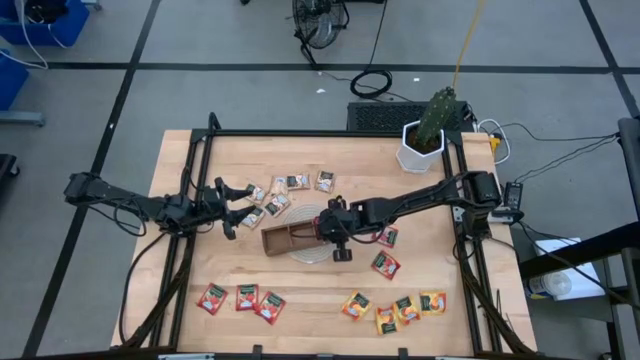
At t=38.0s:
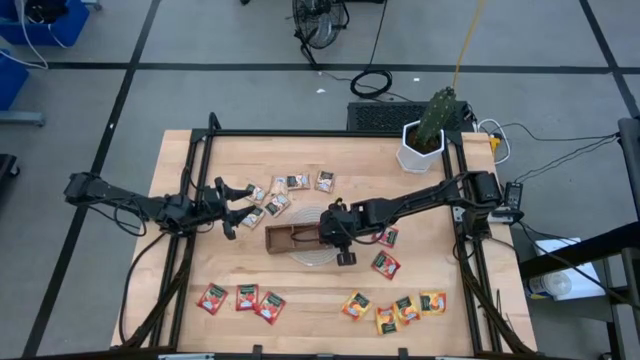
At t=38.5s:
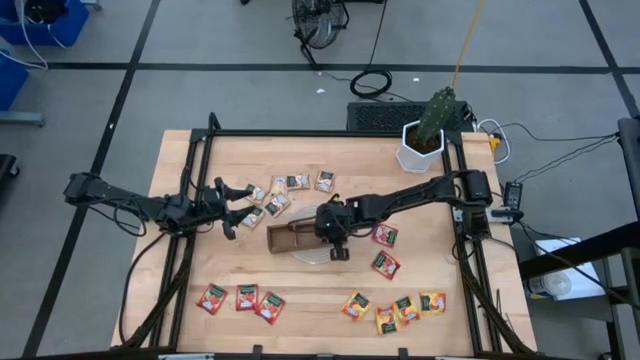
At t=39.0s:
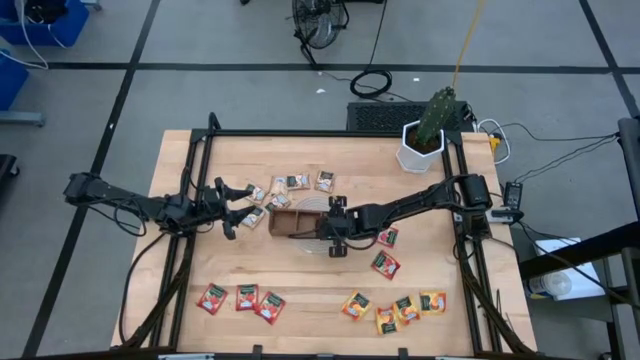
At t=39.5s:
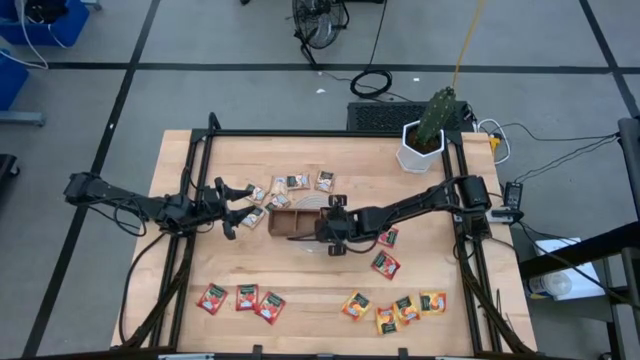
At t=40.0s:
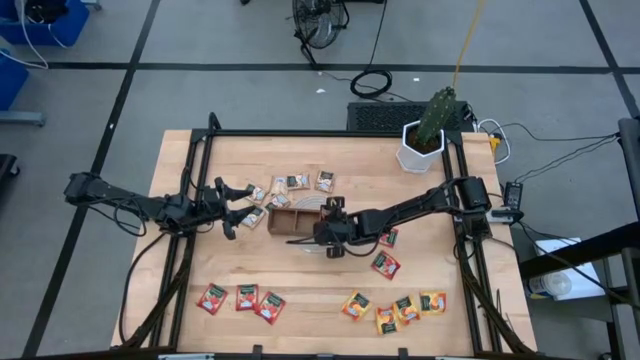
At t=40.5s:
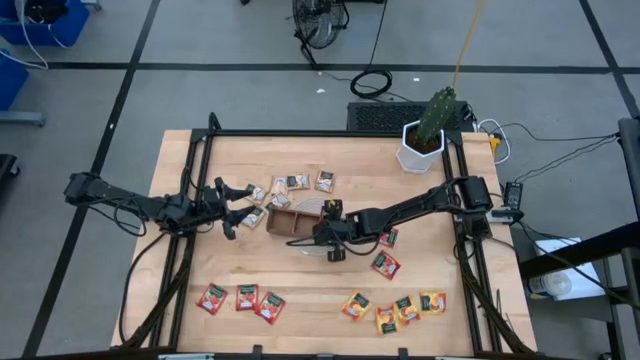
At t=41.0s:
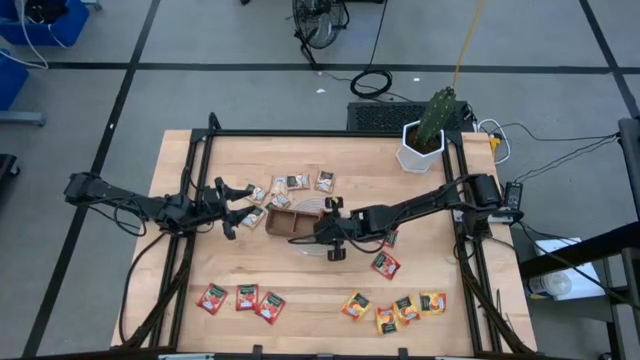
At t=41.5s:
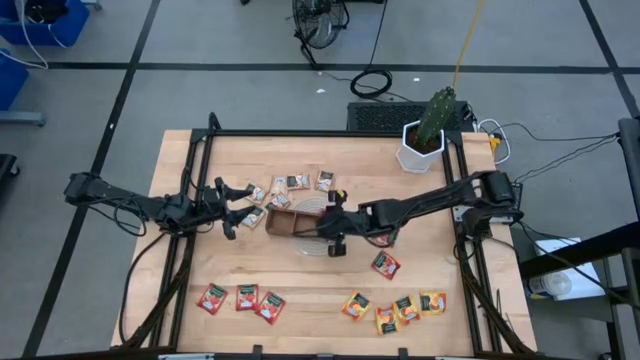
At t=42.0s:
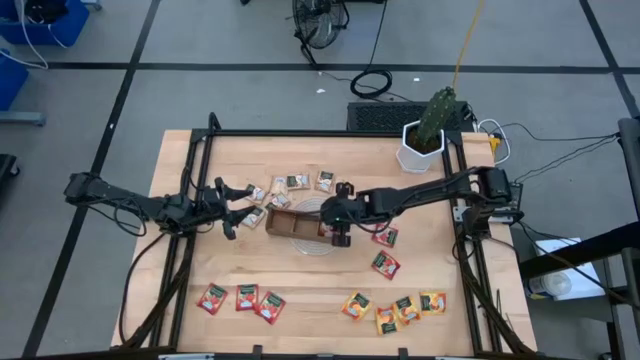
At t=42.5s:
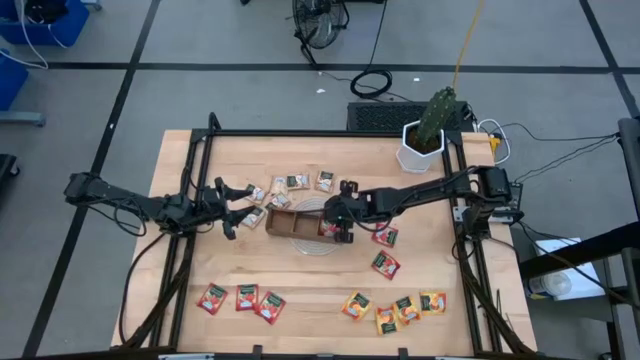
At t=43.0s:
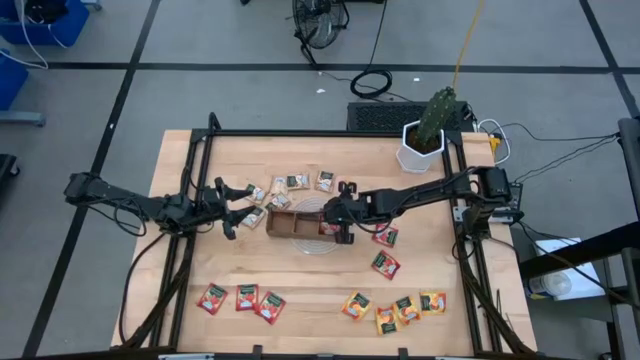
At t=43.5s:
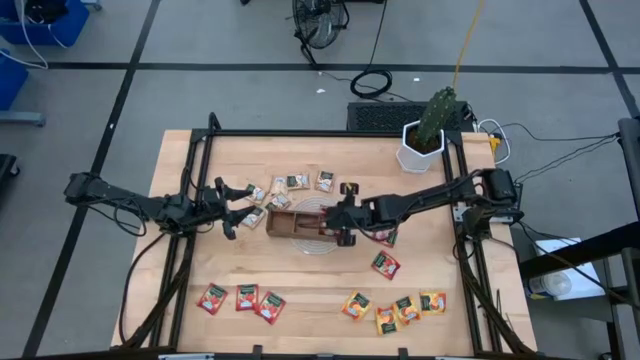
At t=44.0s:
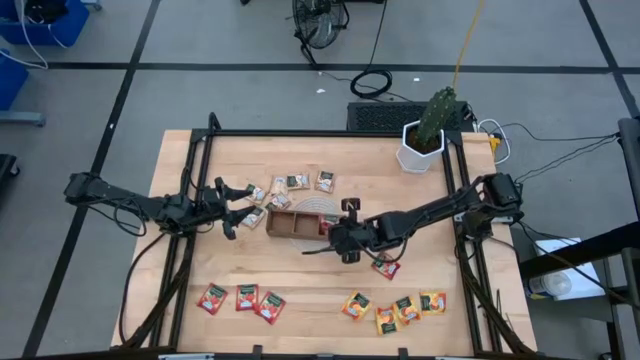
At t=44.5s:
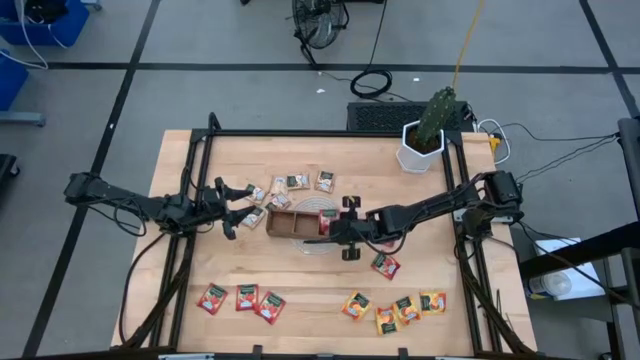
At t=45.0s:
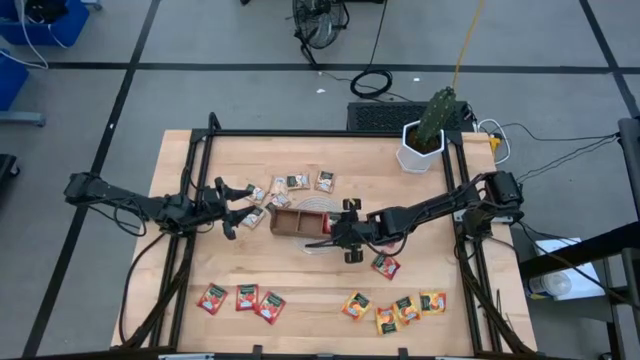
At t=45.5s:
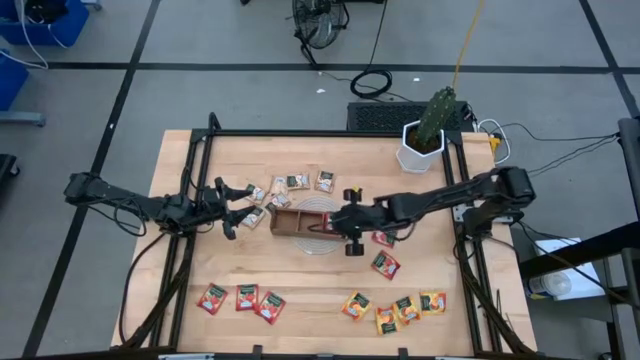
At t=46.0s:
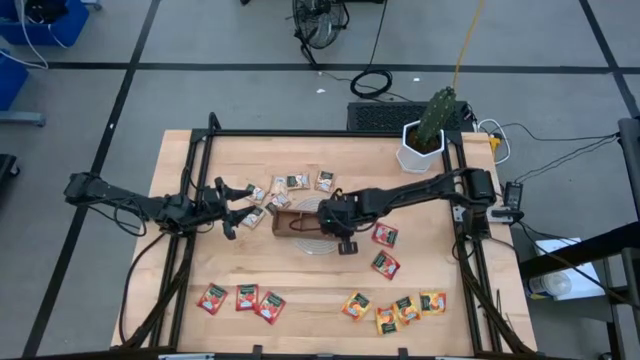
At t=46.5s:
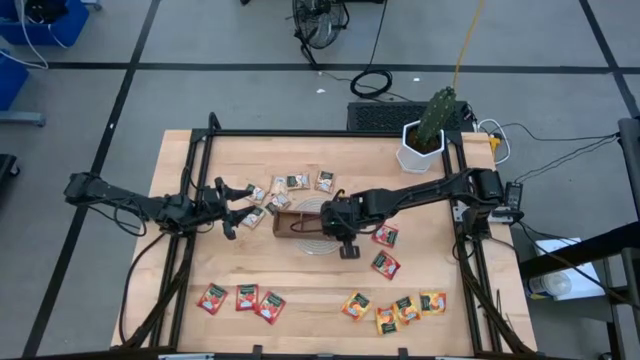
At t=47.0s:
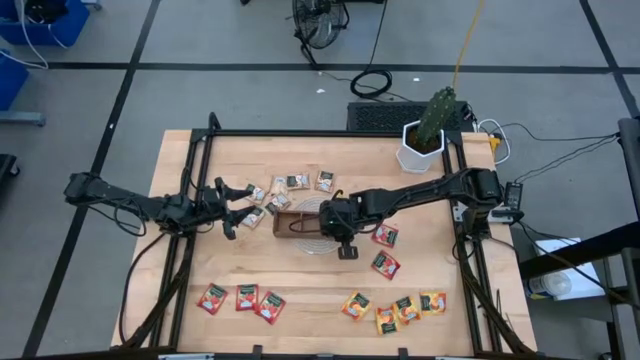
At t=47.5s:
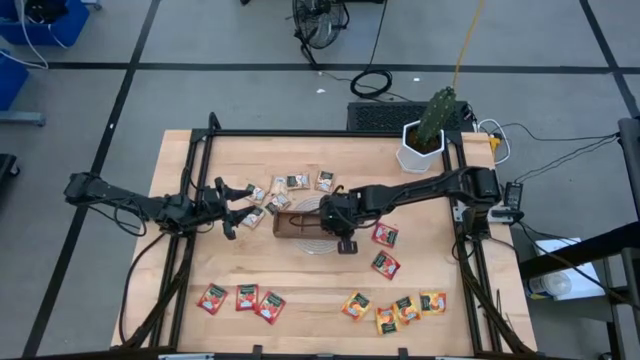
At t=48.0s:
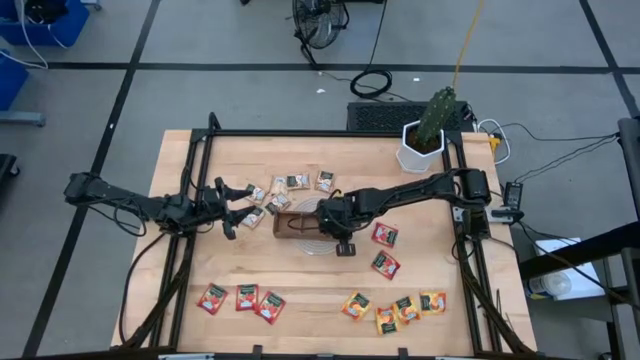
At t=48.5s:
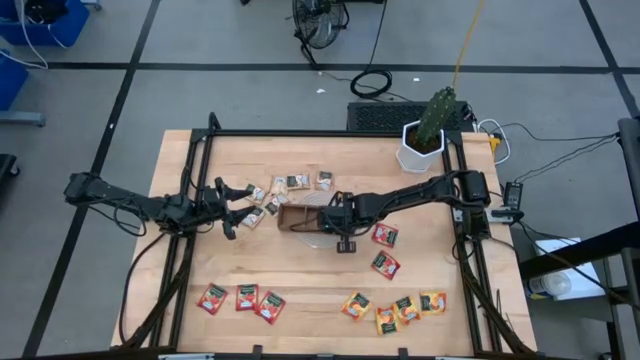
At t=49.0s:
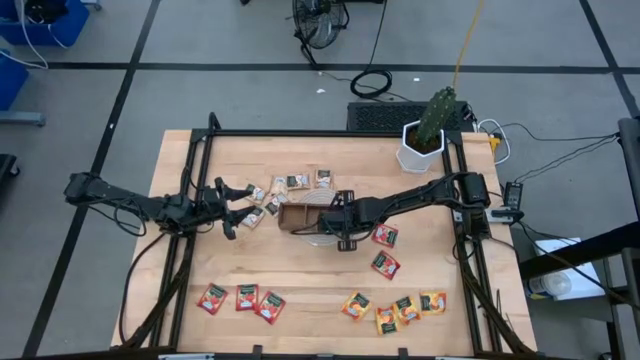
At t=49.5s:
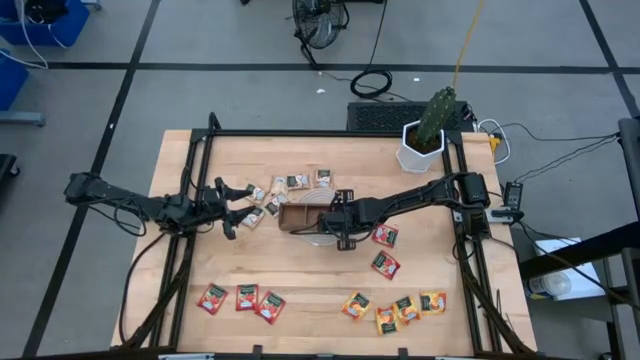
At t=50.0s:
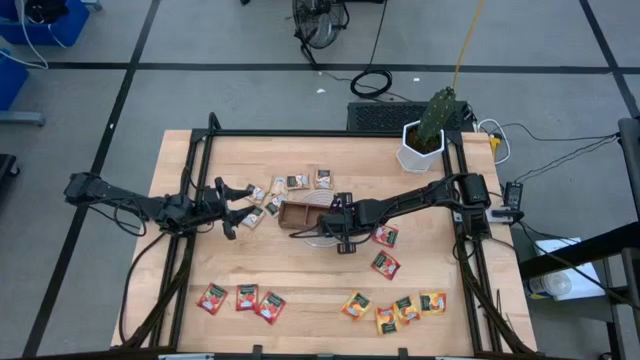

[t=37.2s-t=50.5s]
Task: Pick & Place Tea
Put the red tea bag into the right section of the wood organizer

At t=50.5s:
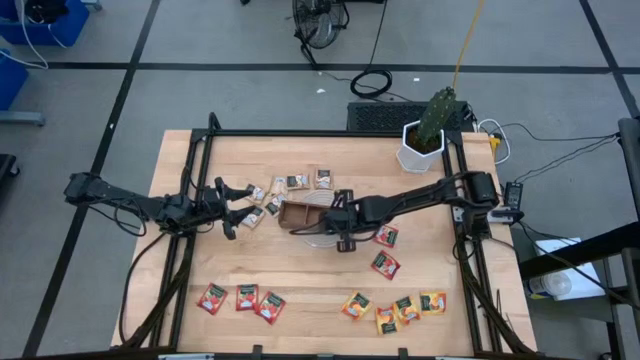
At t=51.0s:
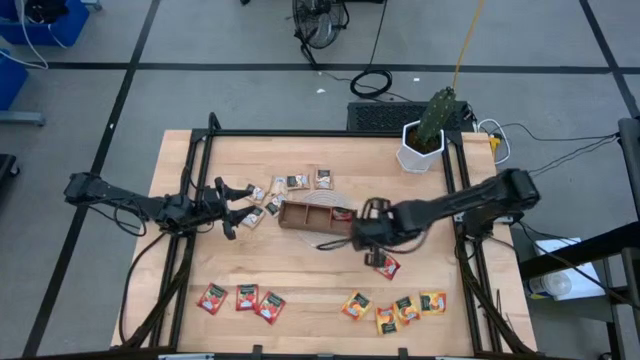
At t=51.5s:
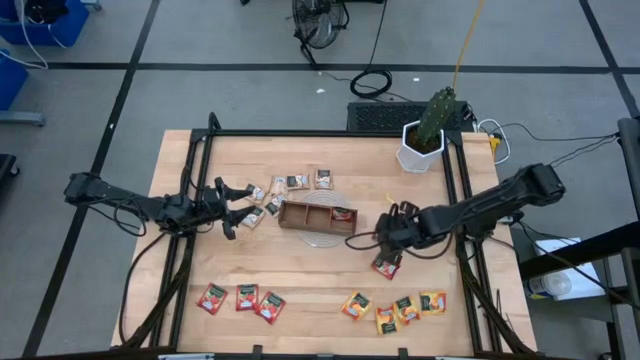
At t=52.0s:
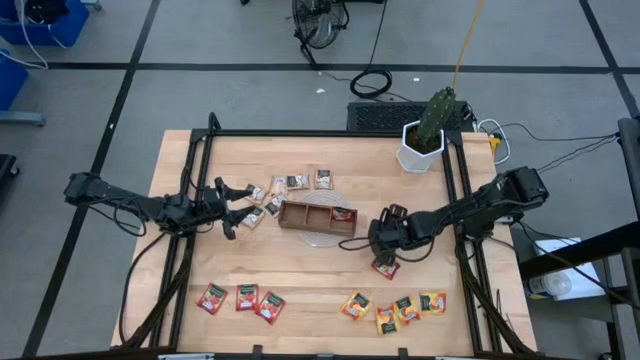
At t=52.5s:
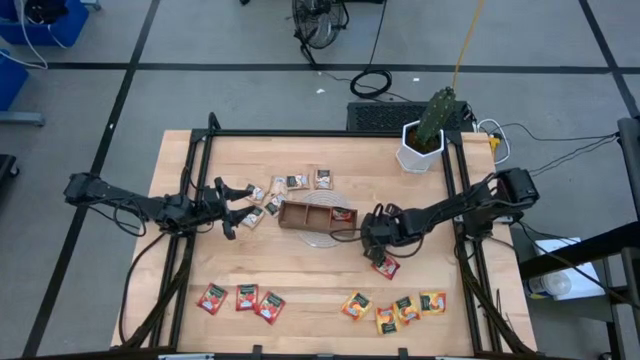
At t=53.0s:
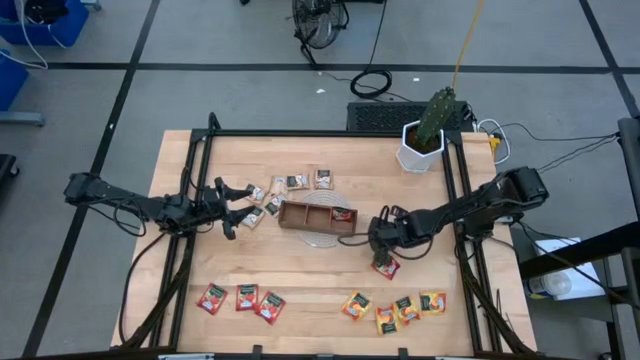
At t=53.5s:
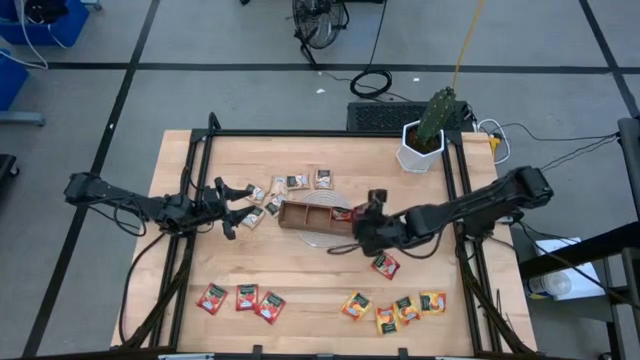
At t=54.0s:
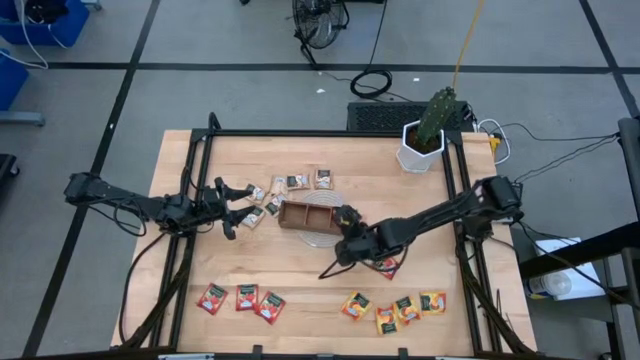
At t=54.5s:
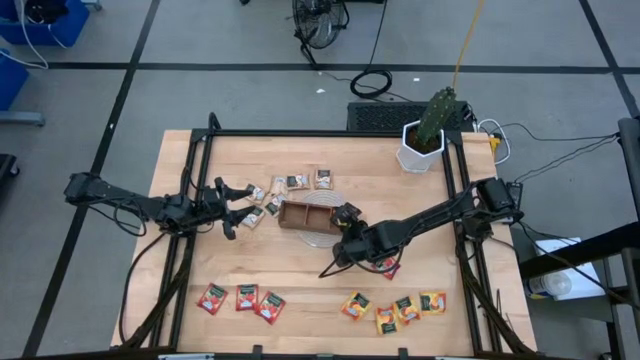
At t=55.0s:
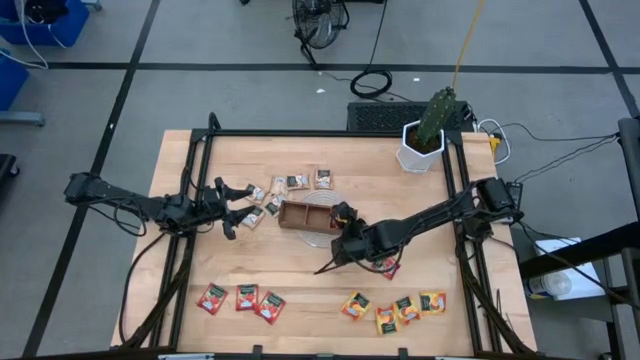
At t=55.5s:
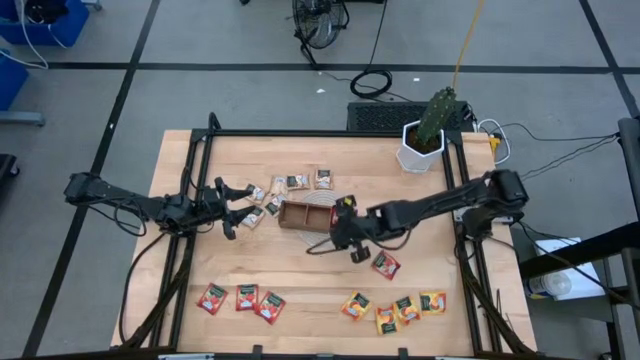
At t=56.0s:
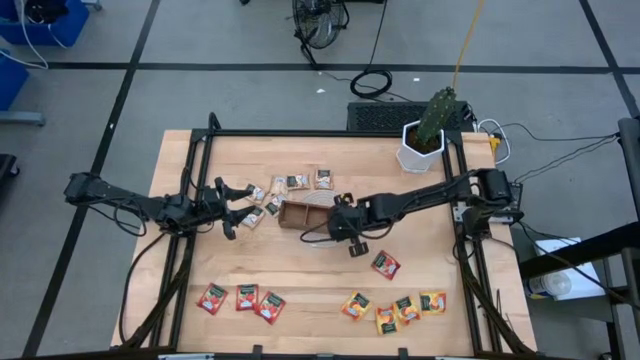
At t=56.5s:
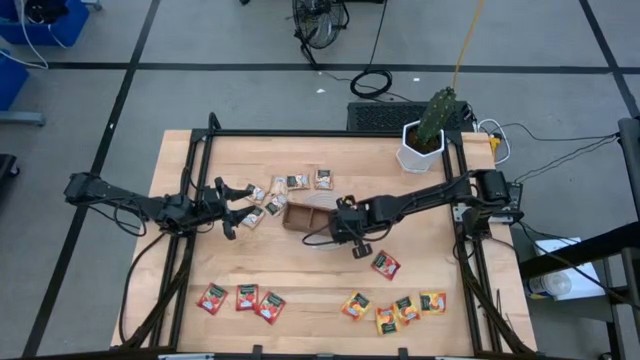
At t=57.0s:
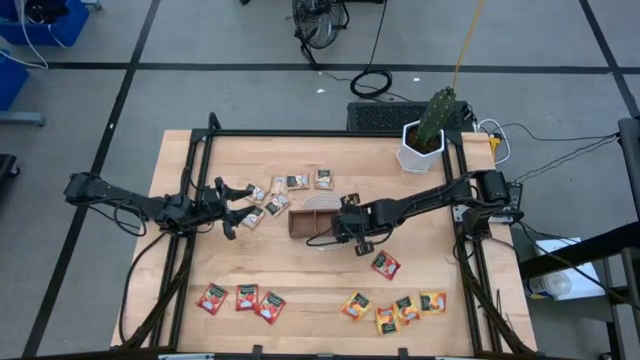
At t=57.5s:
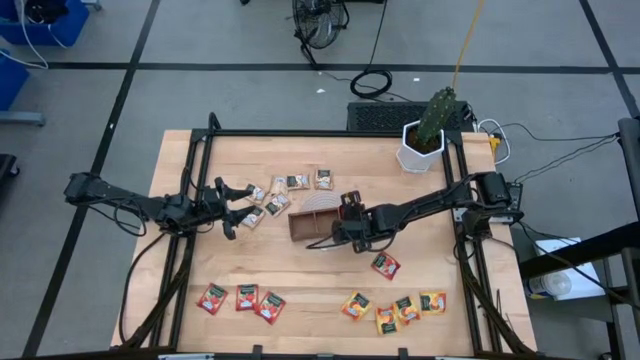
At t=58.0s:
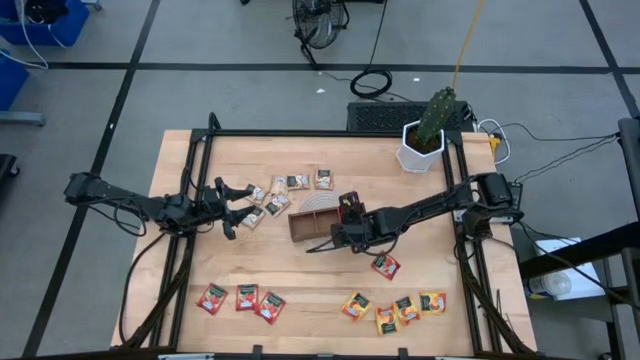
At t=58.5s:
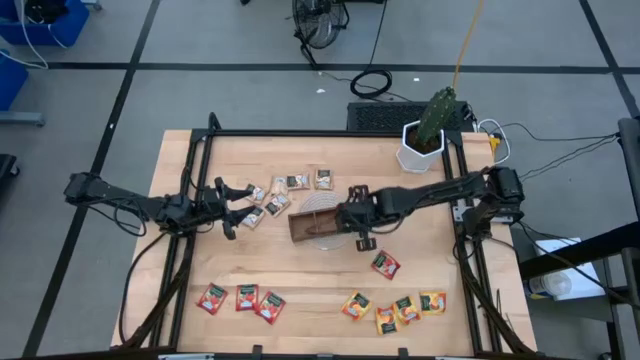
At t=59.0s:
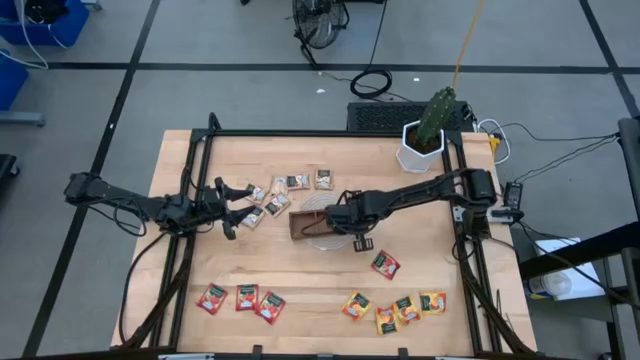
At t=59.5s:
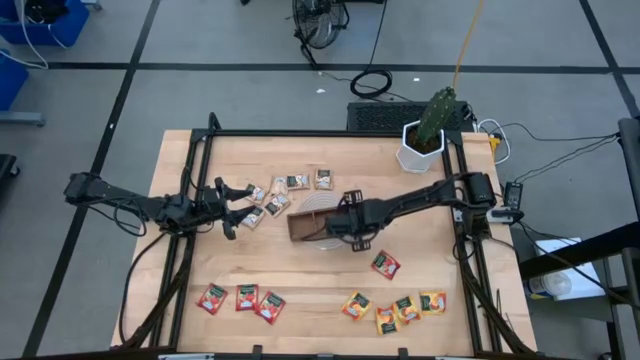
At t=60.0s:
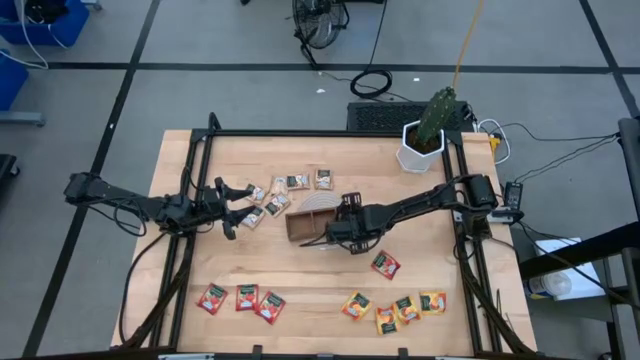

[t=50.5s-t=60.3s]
Put the red tea bag into the right section of the wood organizer
